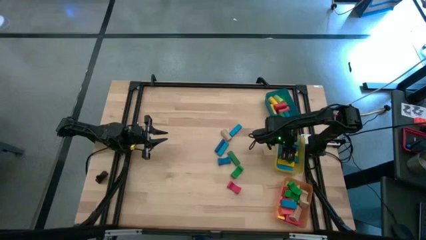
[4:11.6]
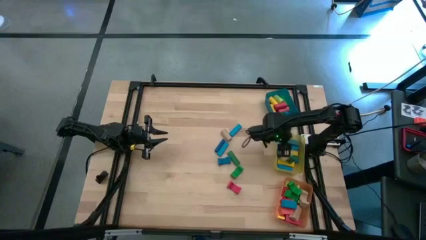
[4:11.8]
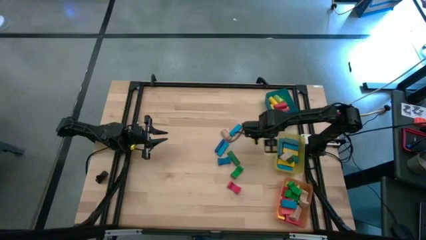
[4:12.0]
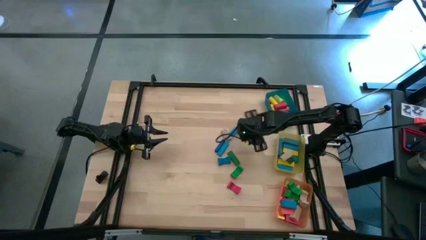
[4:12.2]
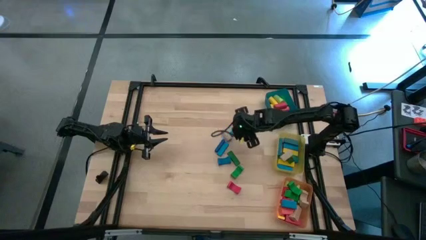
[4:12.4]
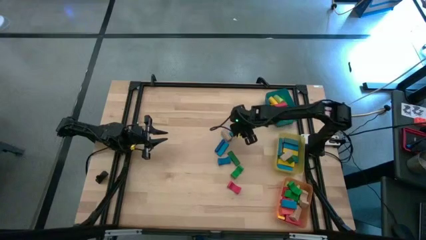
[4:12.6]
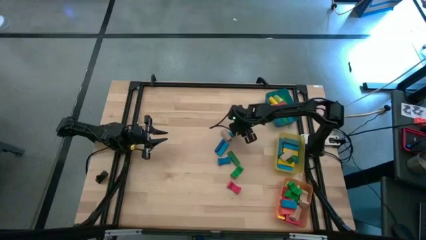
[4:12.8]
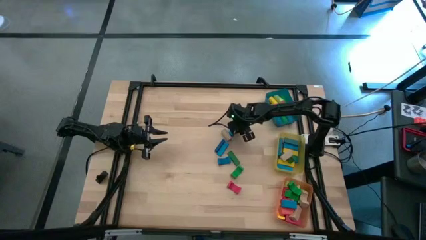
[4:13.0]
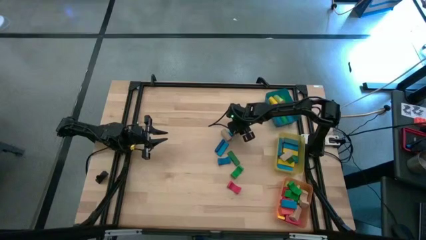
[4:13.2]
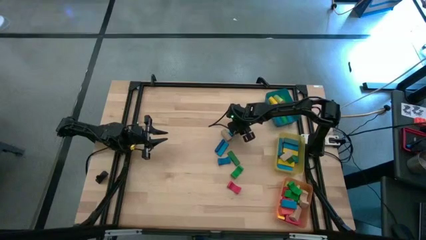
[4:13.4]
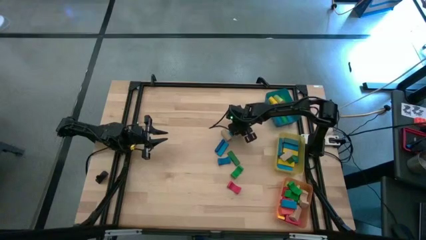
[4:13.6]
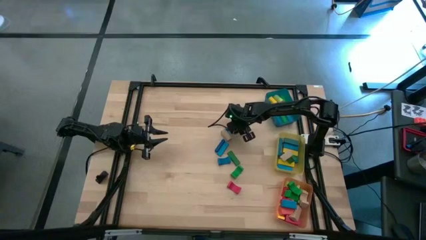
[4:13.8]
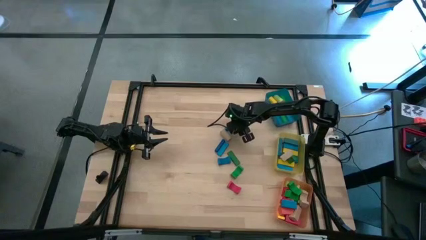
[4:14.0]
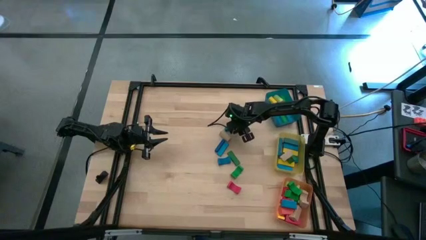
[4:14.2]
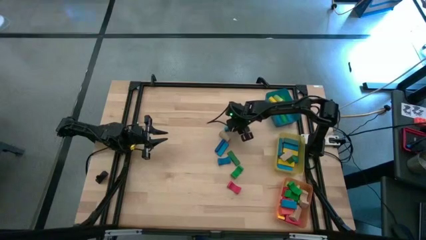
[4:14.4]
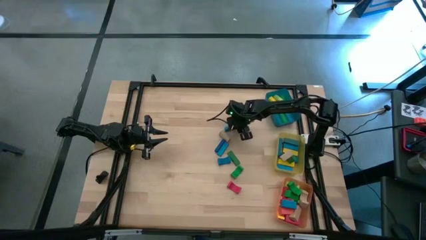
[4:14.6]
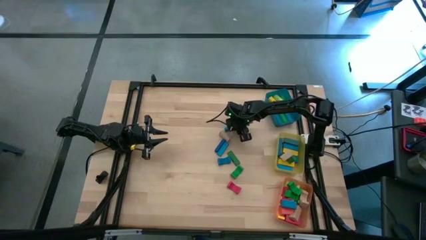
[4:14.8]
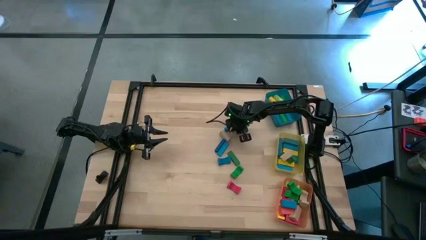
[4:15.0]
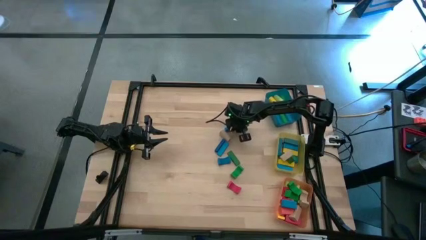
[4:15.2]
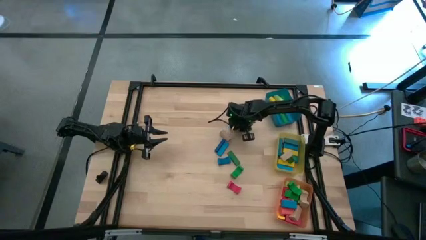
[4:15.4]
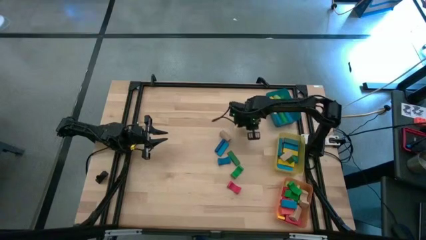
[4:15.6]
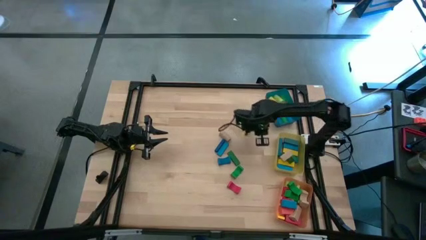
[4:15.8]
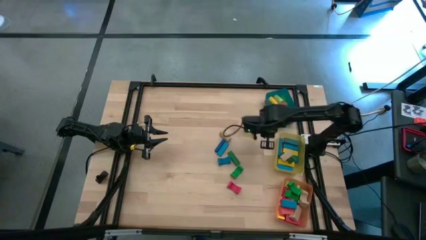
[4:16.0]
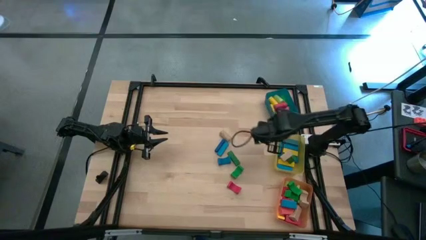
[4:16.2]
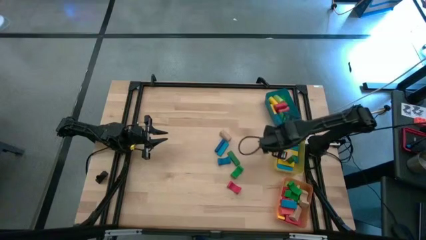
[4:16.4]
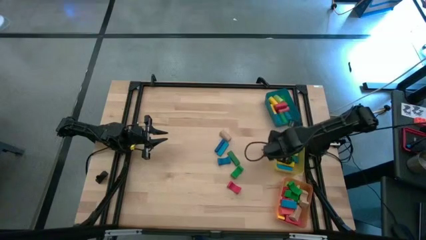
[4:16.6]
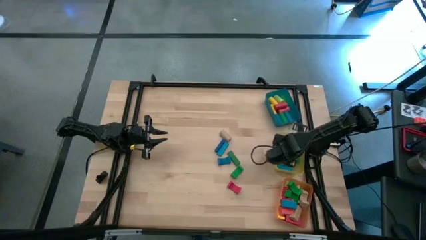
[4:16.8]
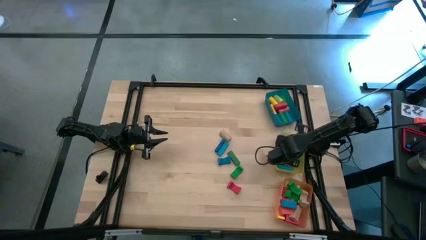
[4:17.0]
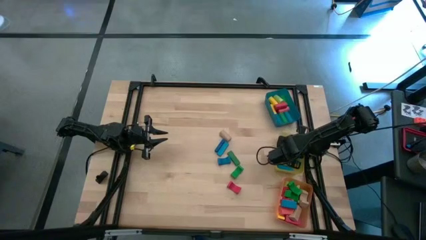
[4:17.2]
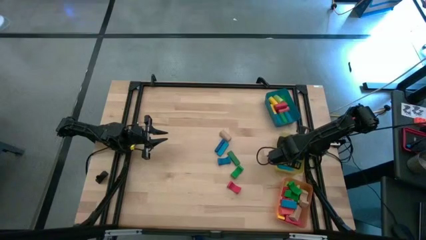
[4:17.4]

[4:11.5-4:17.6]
Task: Sort blocks by size
Put the blue rectangular block into the yellow bin

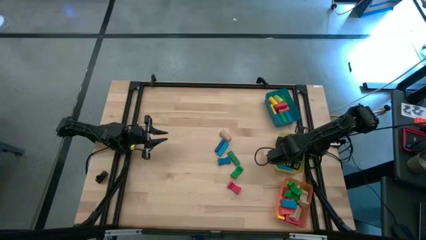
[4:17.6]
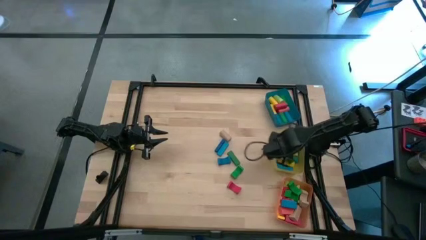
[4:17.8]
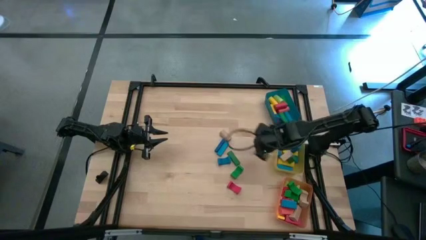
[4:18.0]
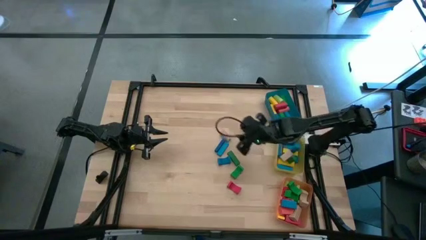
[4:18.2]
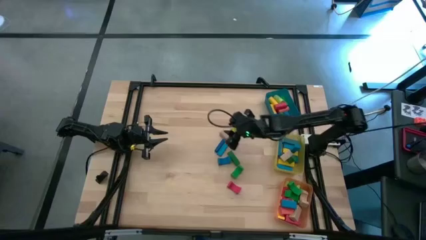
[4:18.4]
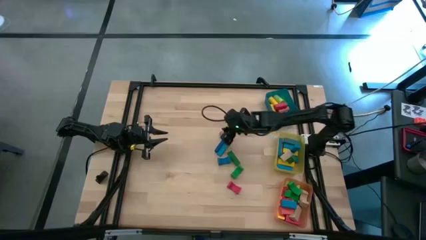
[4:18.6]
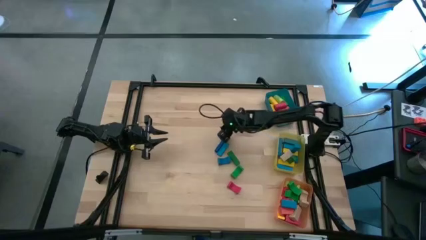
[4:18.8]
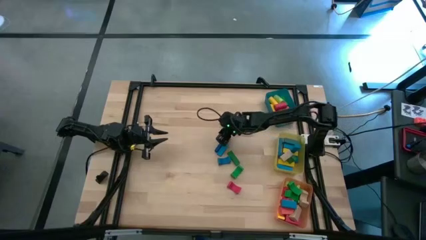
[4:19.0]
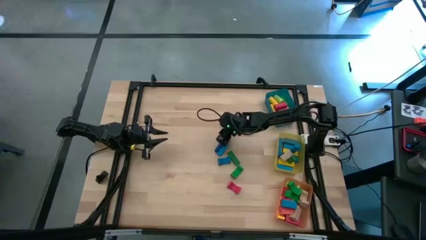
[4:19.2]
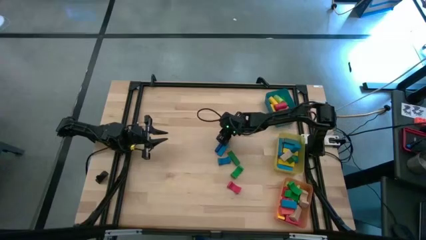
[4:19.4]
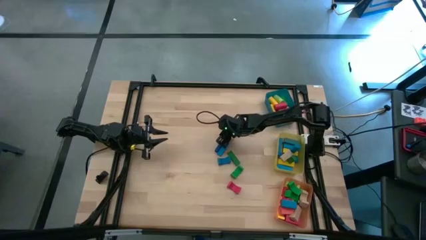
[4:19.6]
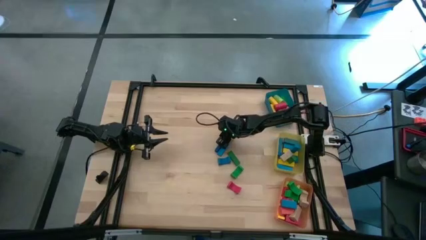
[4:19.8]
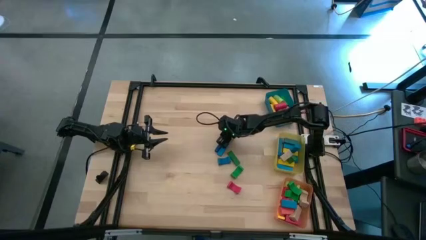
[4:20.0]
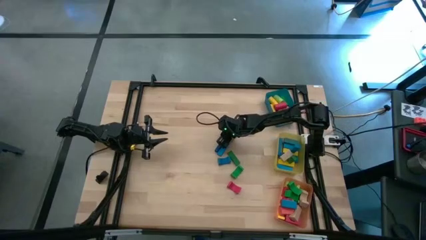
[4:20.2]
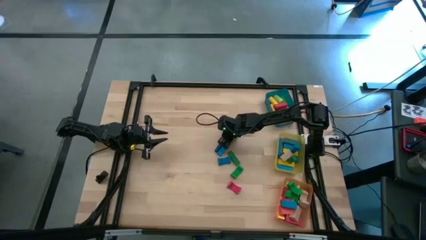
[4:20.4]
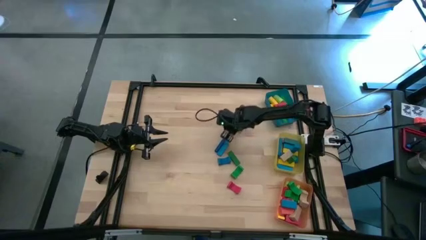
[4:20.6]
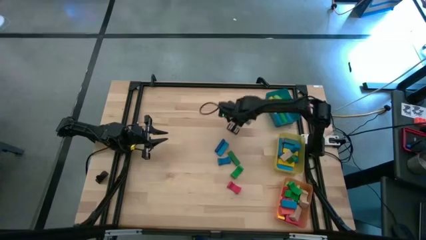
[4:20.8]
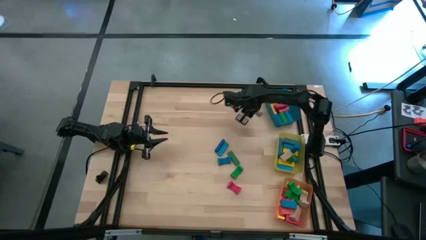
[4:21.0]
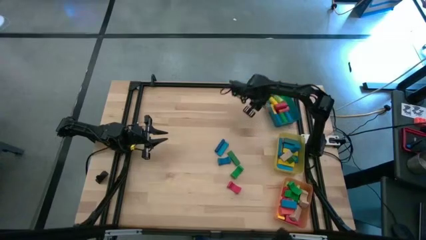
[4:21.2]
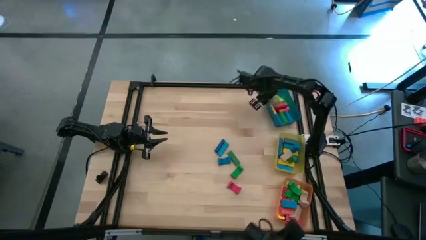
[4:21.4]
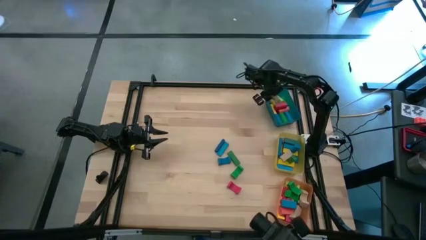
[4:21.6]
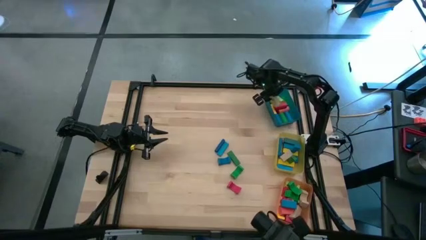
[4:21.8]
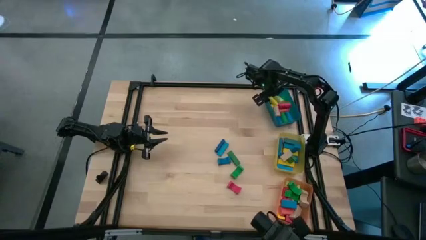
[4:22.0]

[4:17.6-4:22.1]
Put the brown cylindrical block into the blue bin

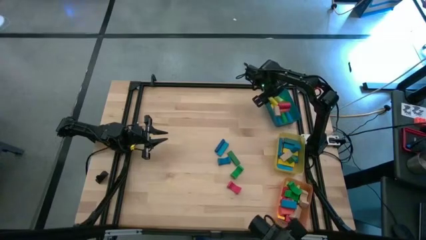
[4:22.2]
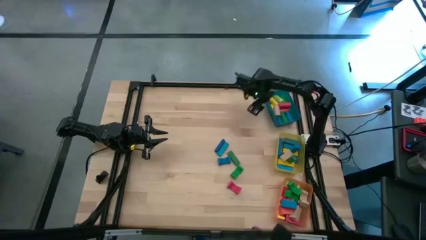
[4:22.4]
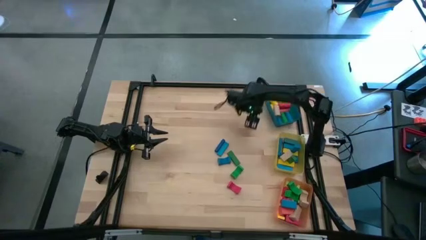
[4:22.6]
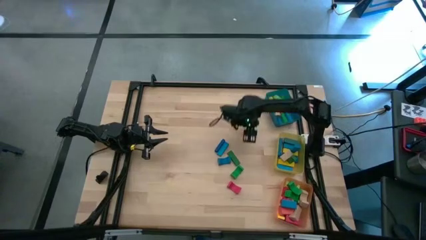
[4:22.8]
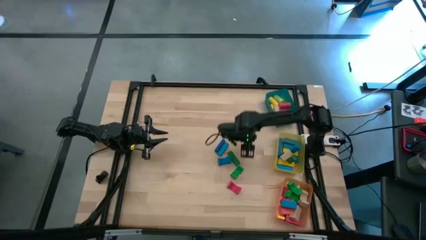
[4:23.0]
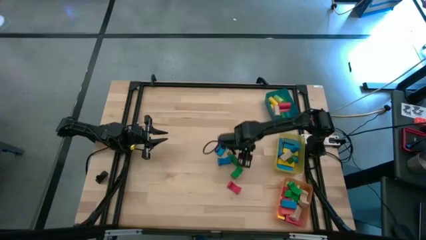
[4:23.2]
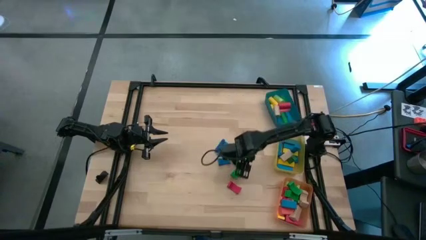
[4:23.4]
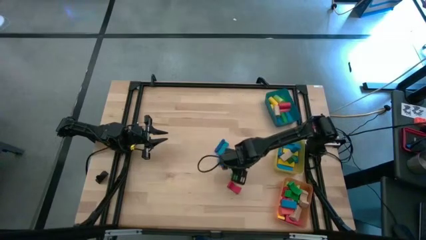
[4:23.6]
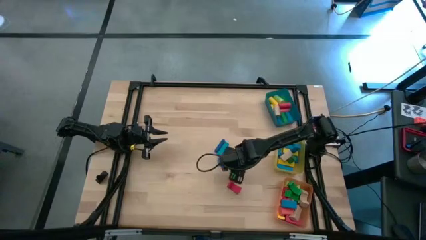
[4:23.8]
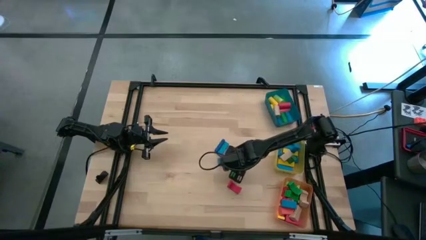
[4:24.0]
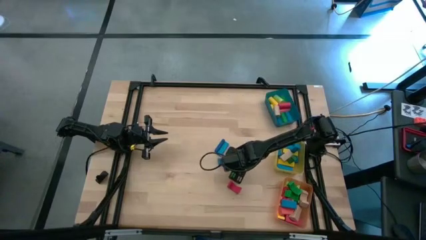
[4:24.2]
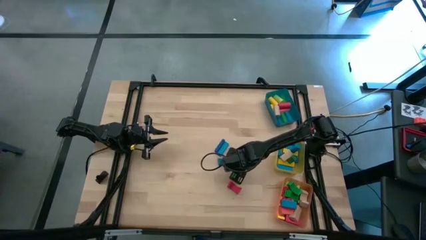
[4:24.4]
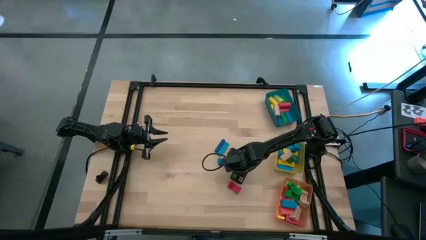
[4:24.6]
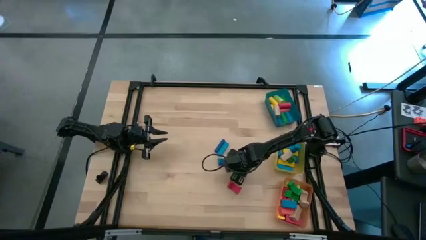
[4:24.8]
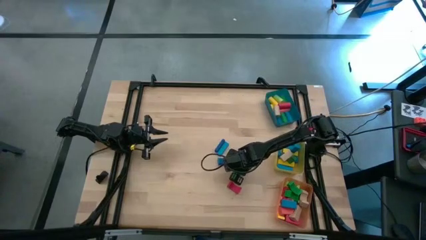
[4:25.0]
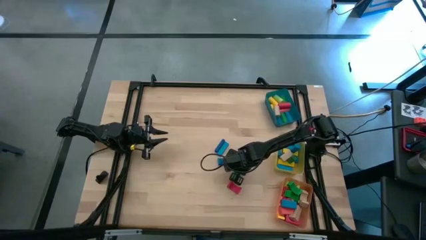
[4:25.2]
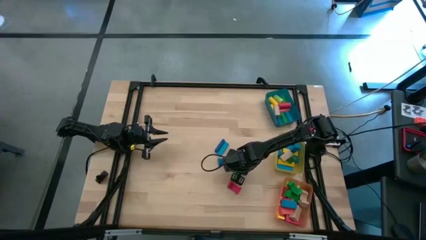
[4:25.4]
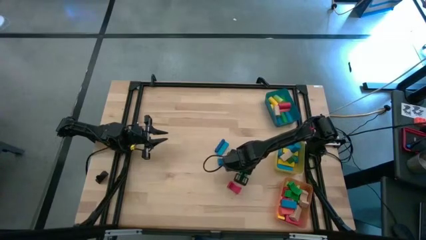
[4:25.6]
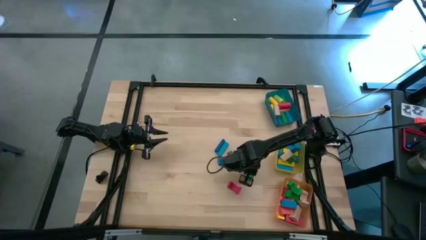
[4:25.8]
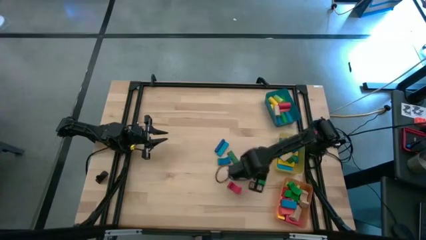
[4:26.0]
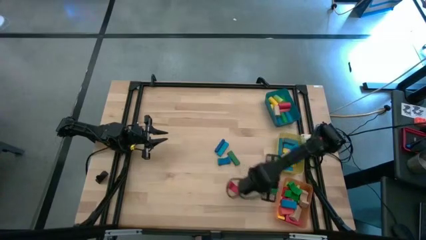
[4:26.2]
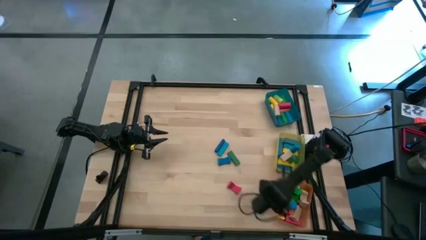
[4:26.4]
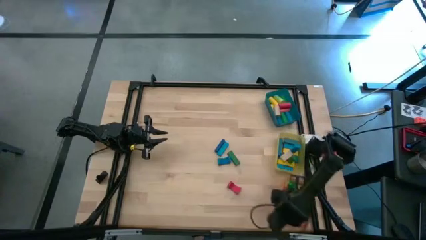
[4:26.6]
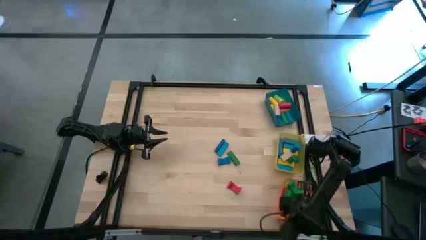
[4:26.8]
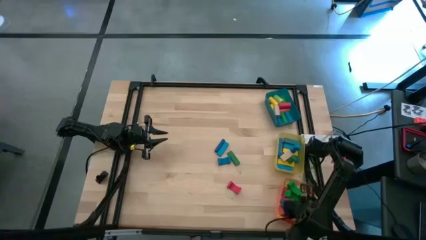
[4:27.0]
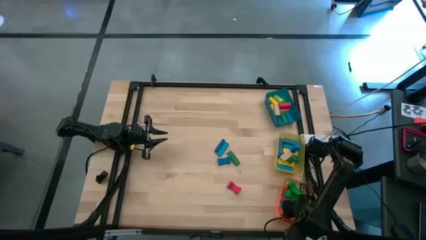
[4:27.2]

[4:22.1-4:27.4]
Put the green arch block into the orange bin
